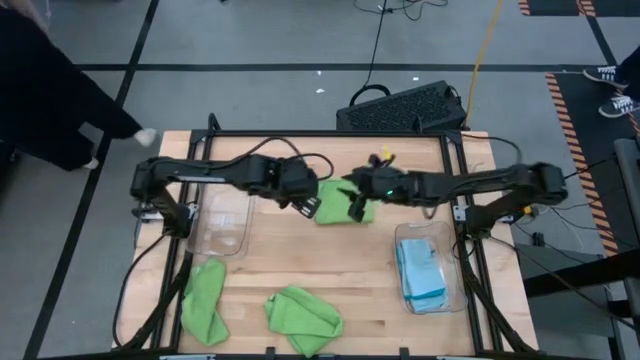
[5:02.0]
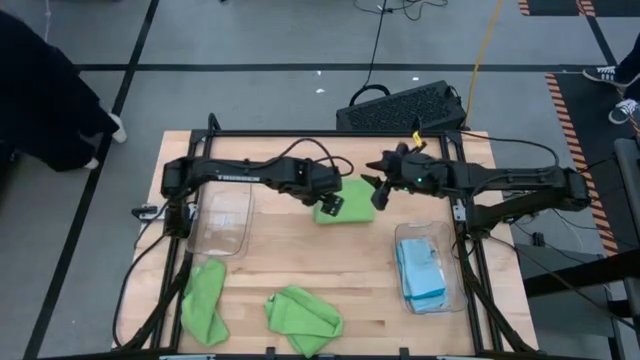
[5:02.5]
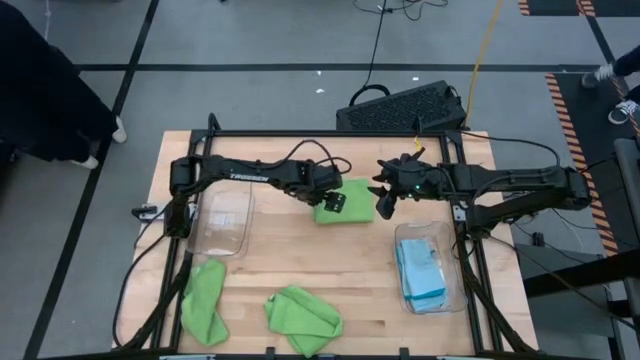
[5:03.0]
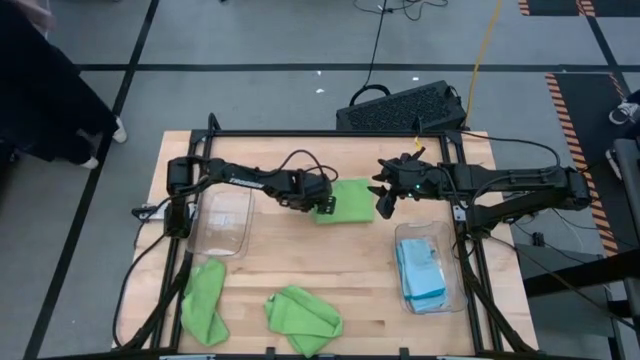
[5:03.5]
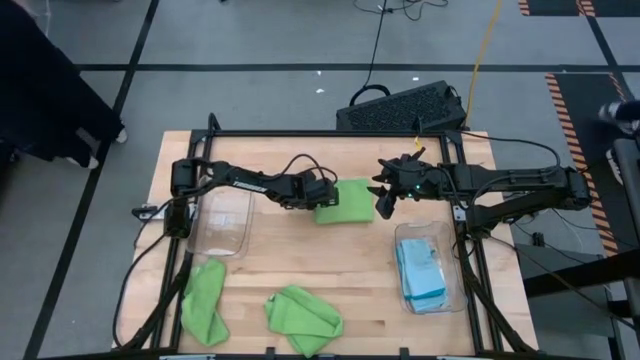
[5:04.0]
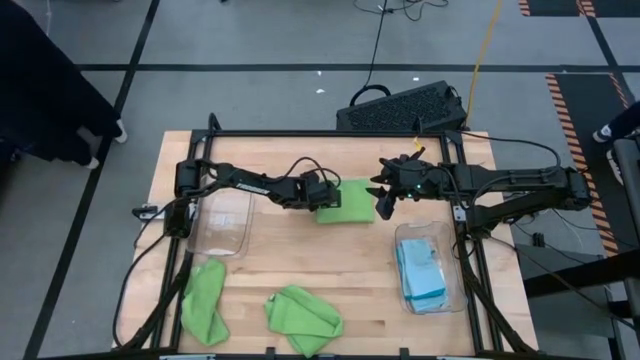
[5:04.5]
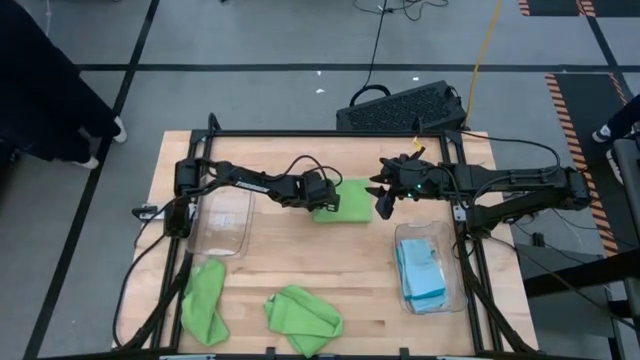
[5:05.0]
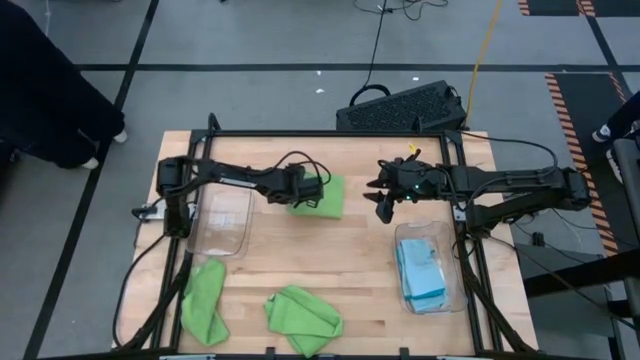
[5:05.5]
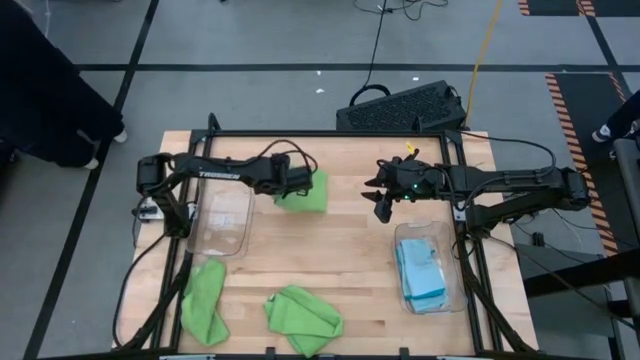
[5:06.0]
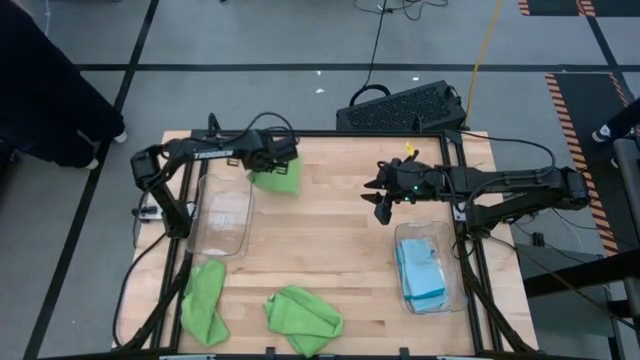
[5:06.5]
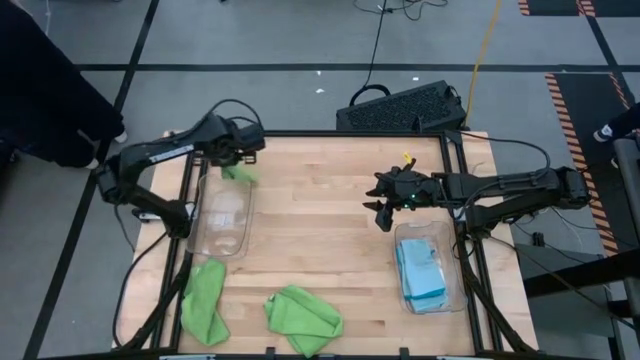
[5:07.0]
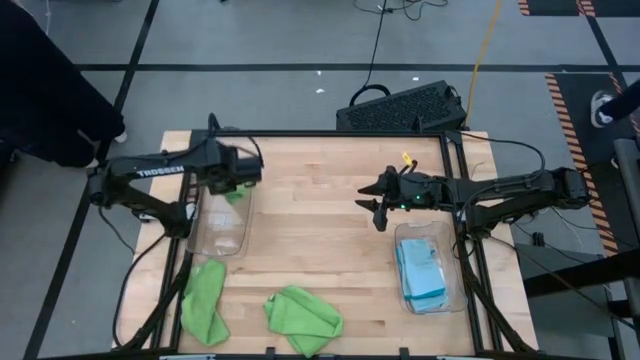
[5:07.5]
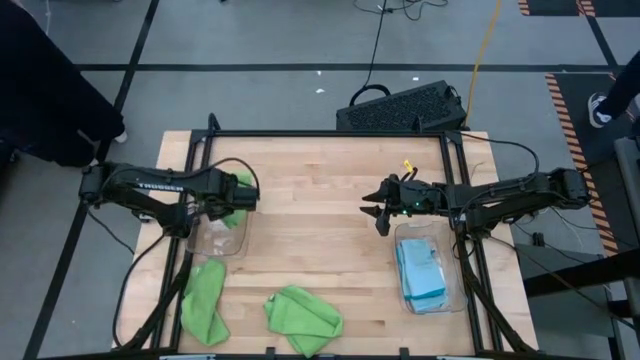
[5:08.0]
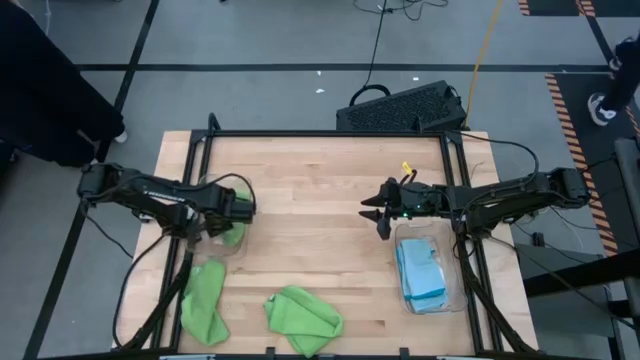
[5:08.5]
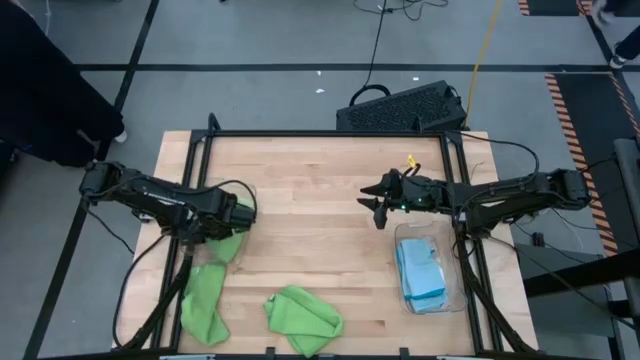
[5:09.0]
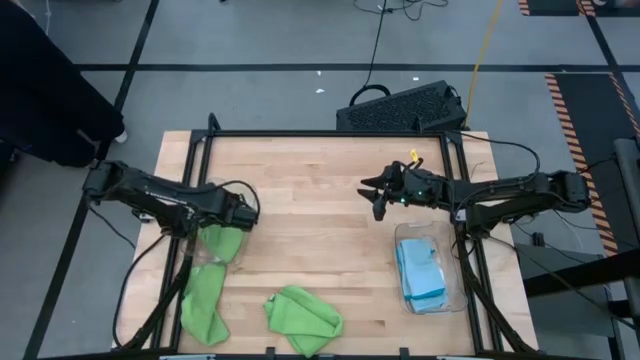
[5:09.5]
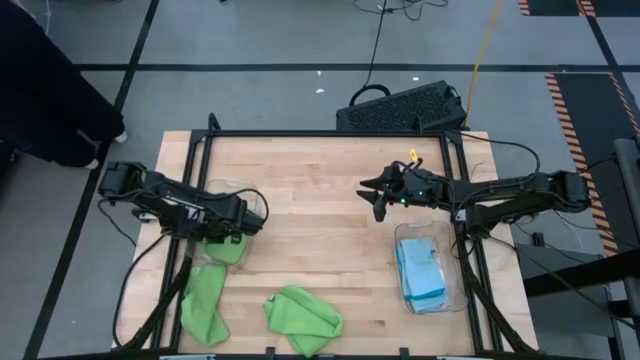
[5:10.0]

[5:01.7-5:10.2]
Task: Sort microfiber towel by color & place in baskets
Put the folded green microfiber towel into the left transparent bin

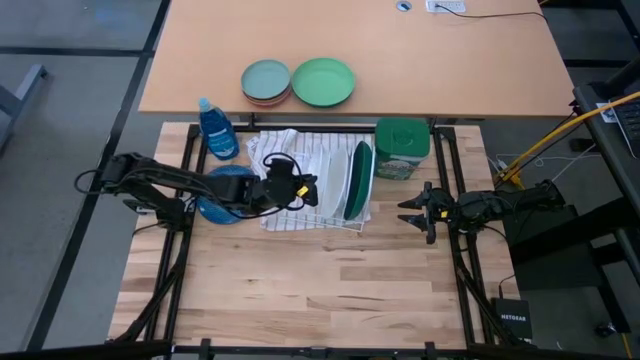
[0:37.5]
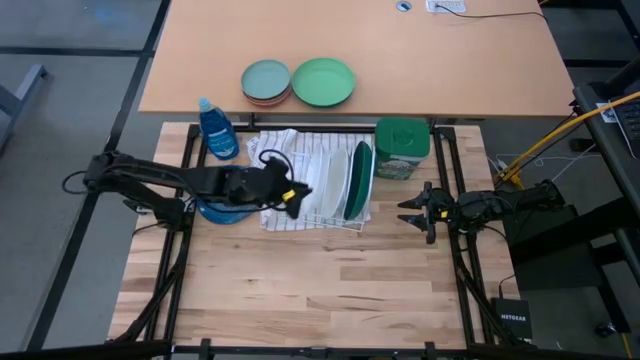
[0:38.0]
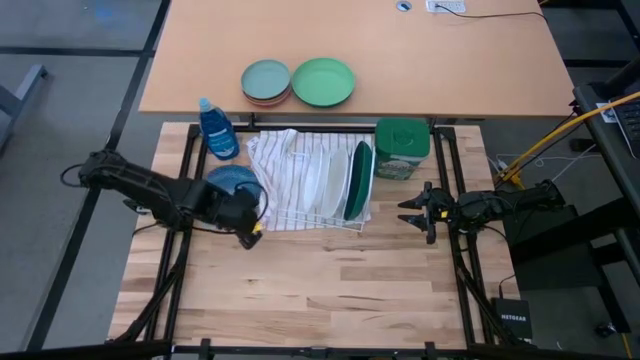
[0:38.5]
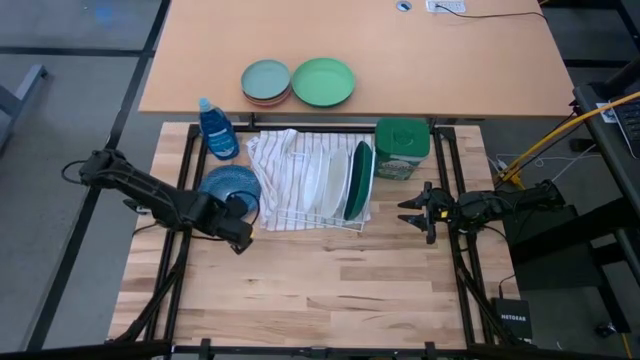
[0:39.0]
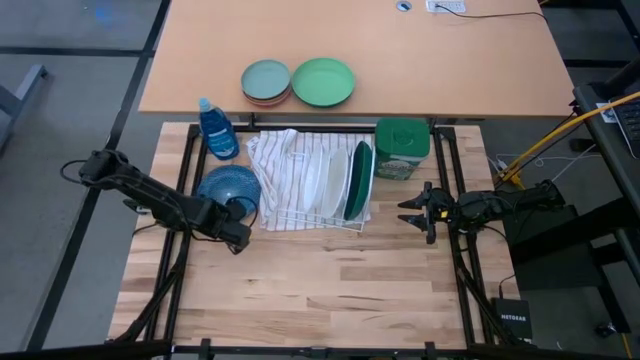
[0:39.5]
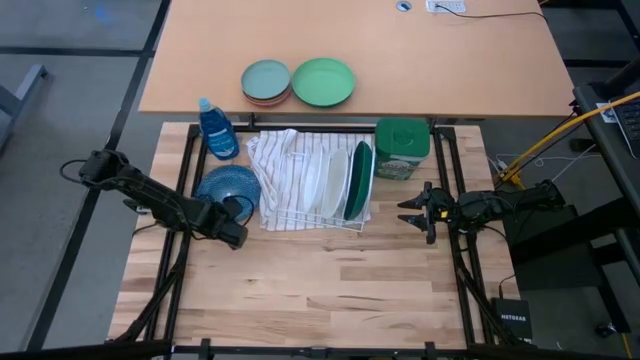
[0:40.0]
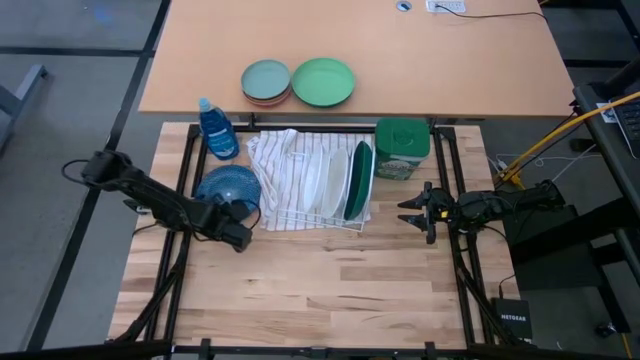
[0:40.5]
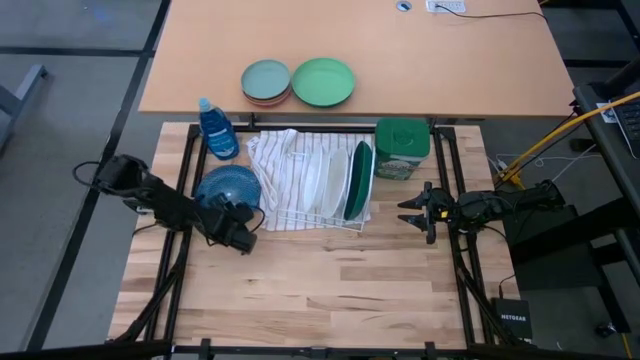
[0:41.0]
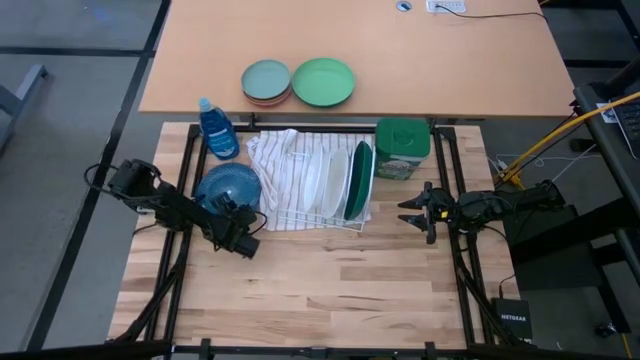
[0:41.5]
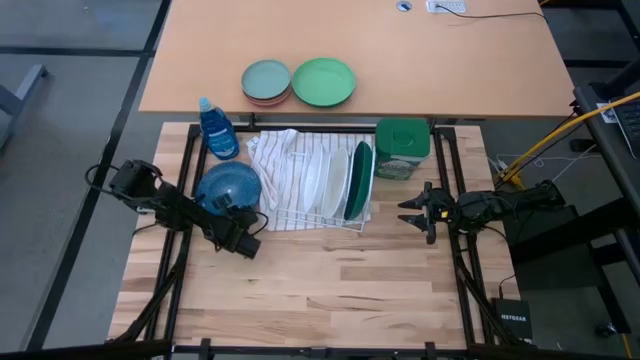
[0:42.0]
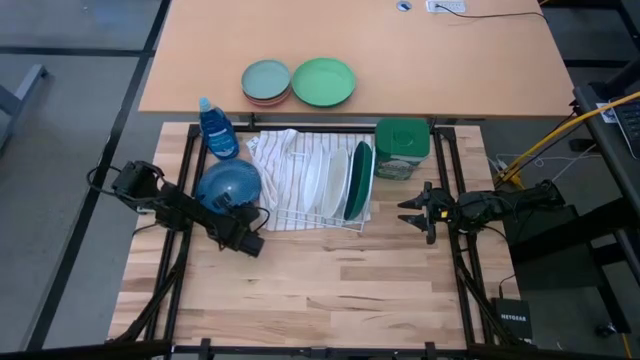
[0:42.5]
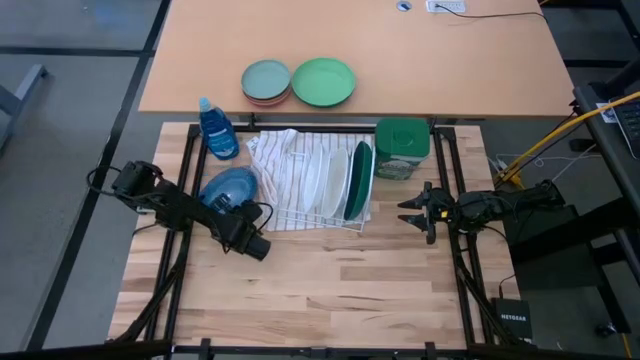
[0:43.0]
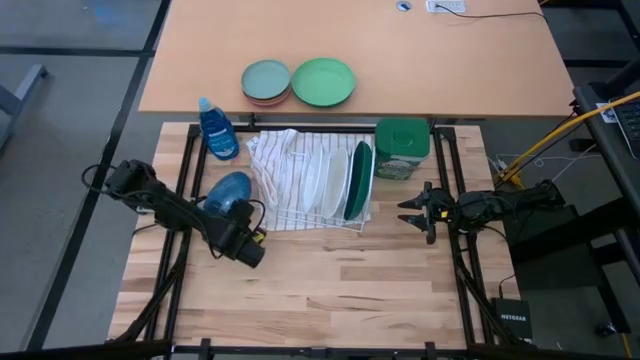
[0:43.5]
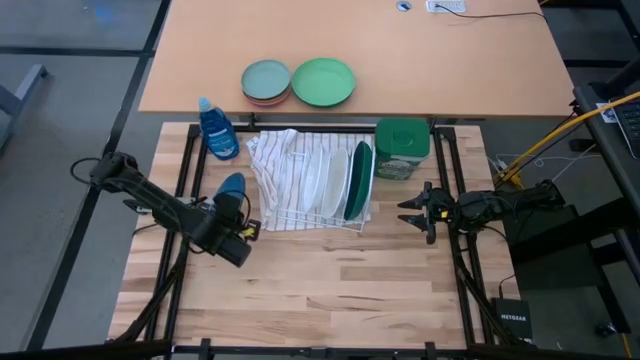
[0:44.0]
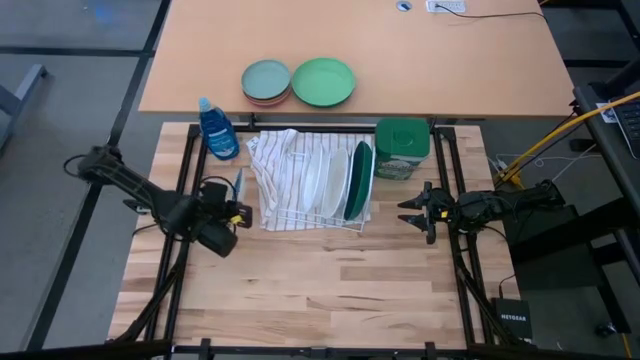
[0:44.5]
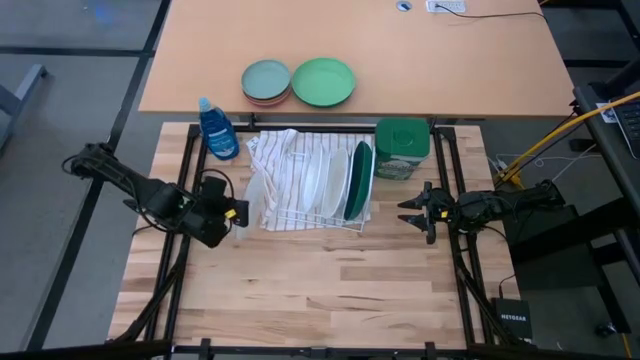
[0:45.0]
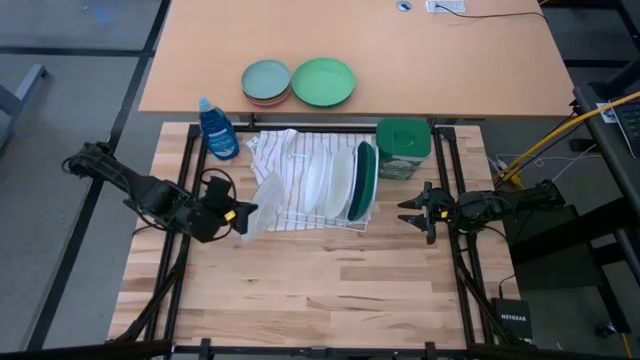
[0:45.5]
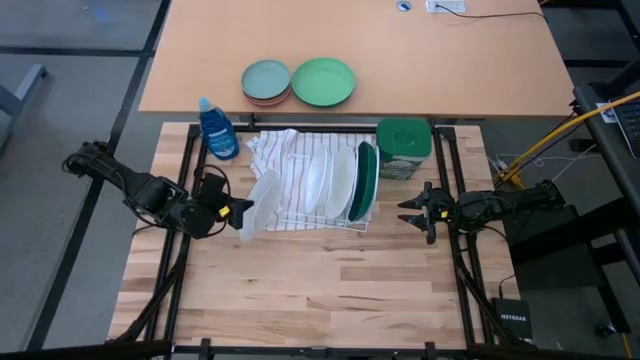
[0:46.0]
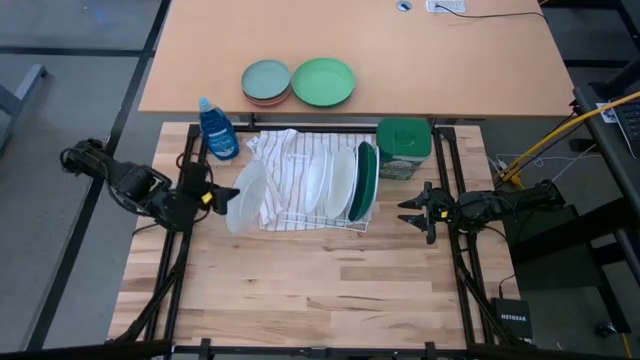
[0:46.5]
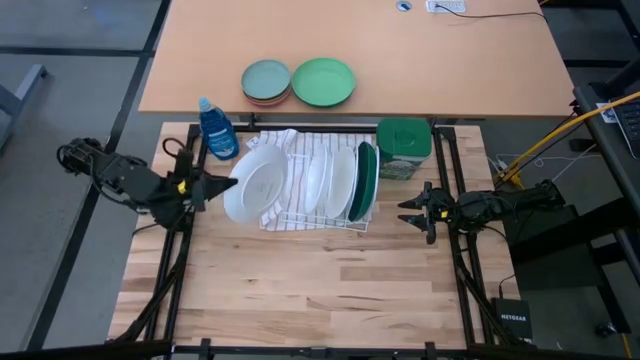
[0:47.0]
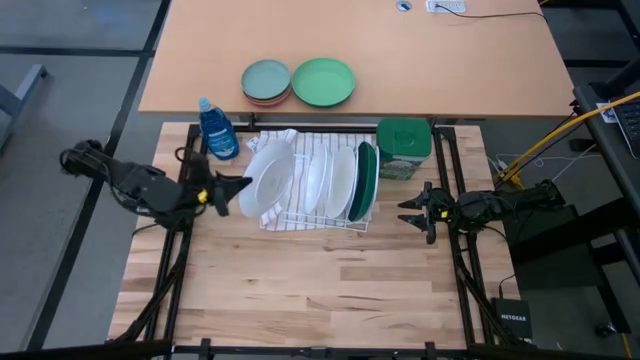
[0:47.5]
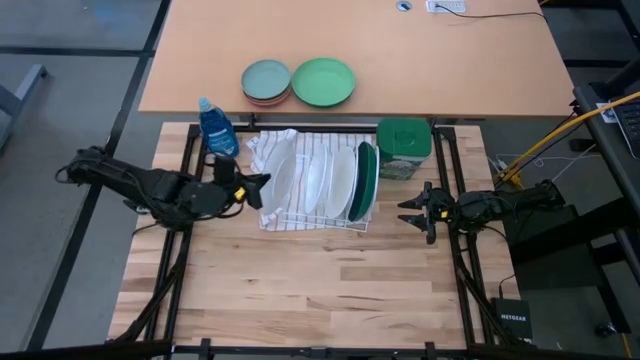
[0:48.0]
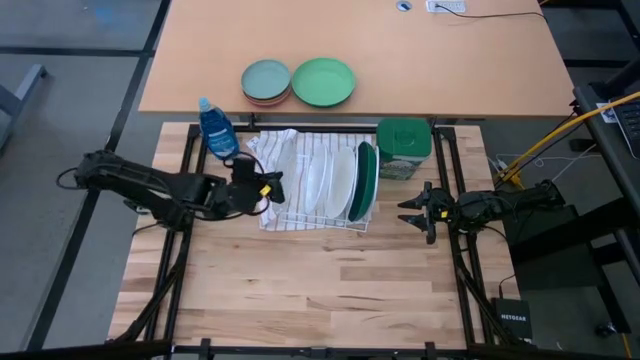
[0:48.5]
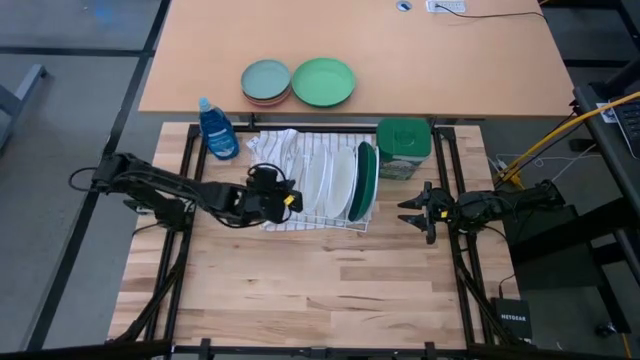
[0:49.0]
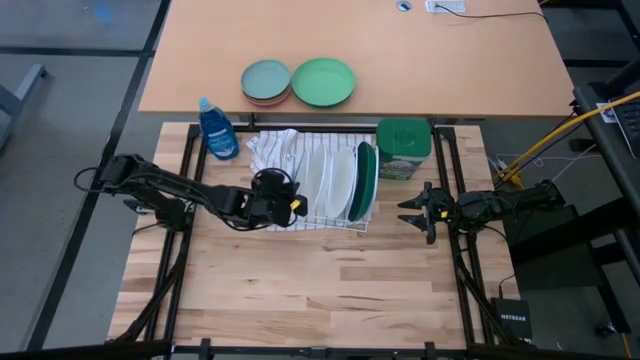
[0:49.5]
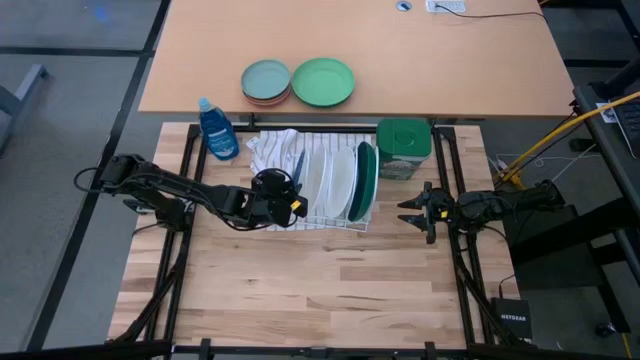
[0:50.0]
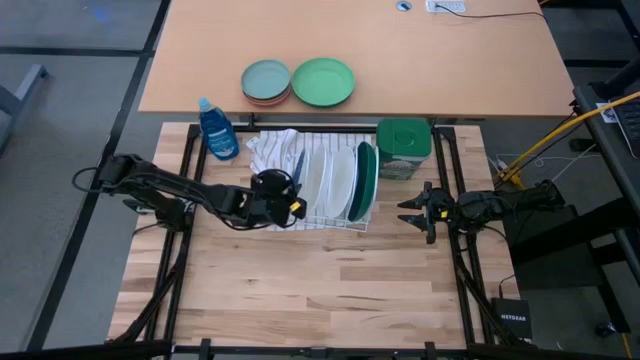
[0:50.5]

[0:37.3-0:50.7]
Task: Sort dishes
Put the blue patterned plate into the dish rack
